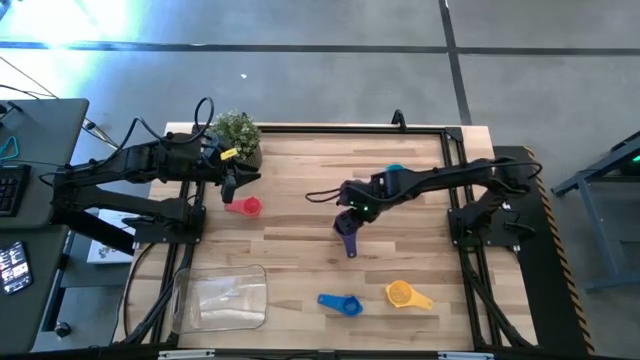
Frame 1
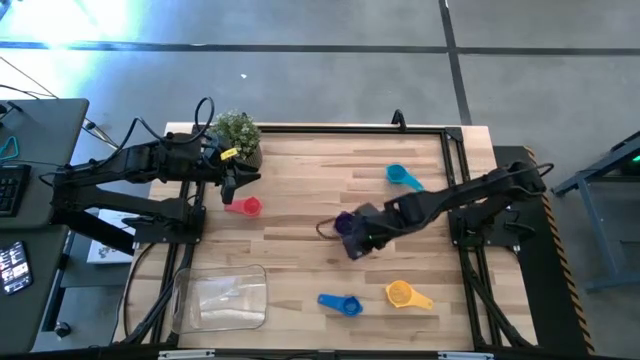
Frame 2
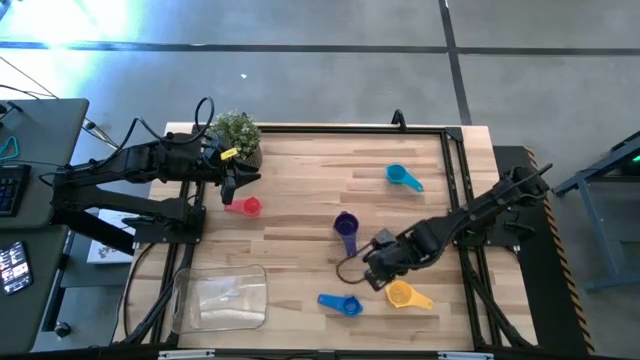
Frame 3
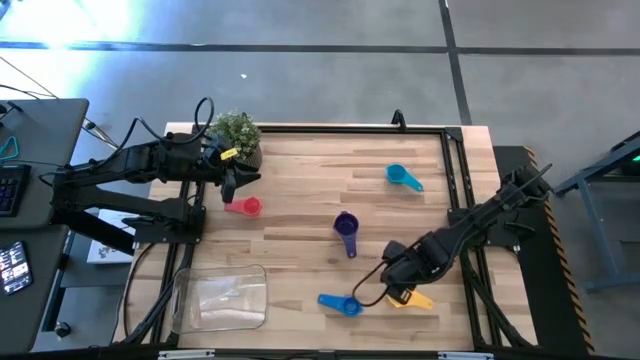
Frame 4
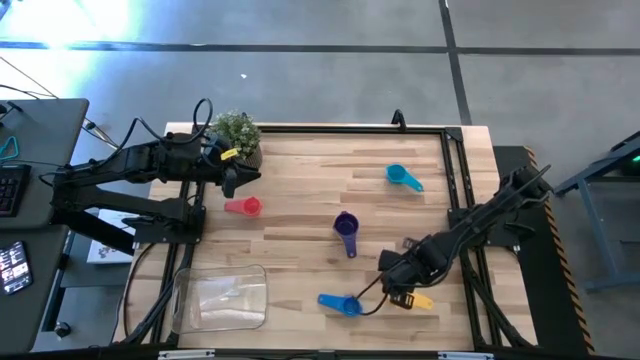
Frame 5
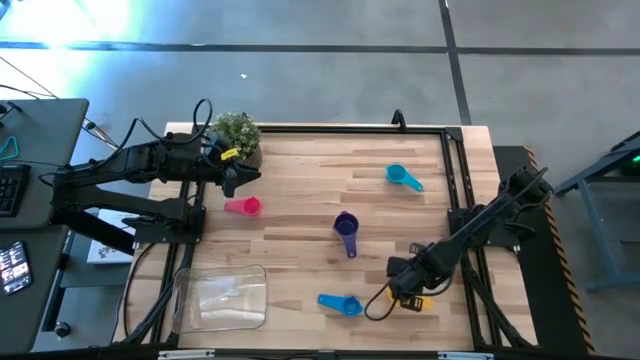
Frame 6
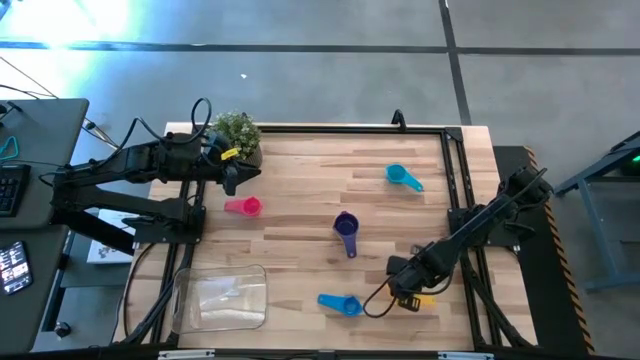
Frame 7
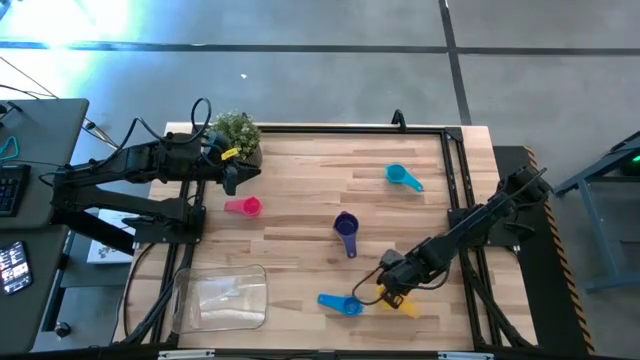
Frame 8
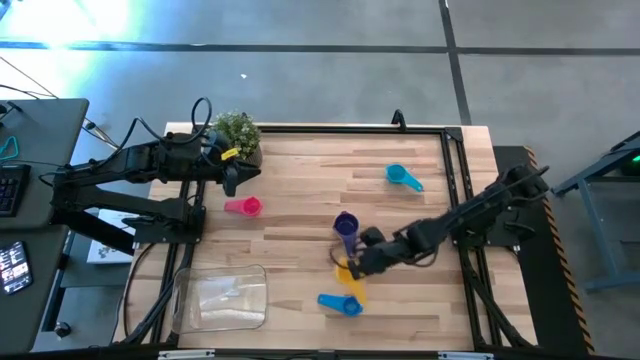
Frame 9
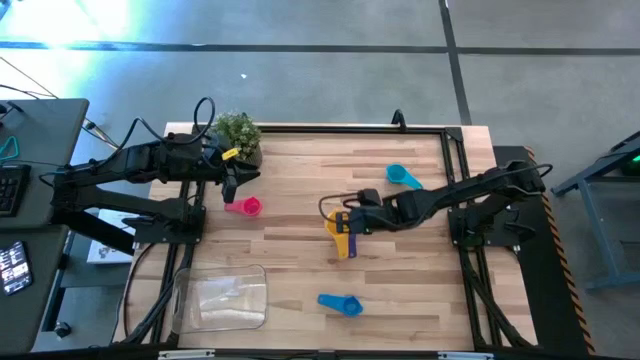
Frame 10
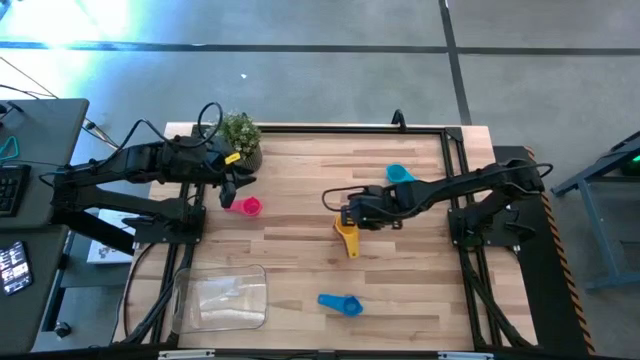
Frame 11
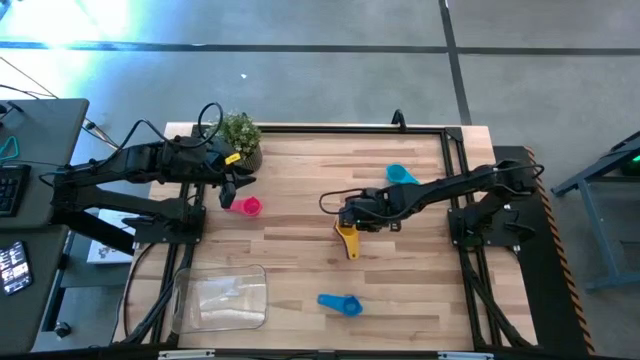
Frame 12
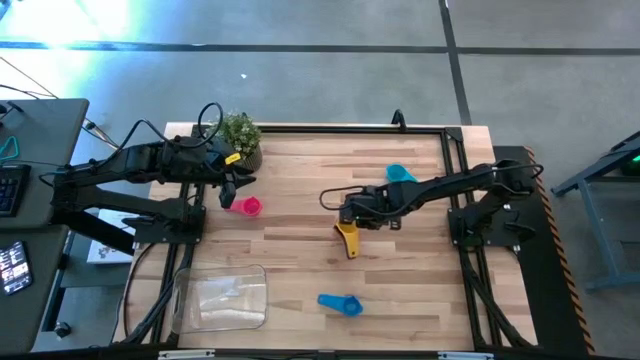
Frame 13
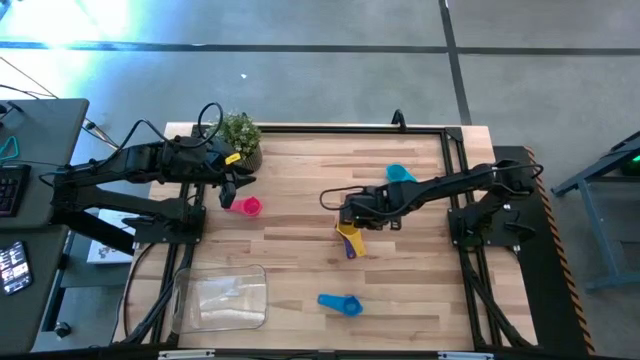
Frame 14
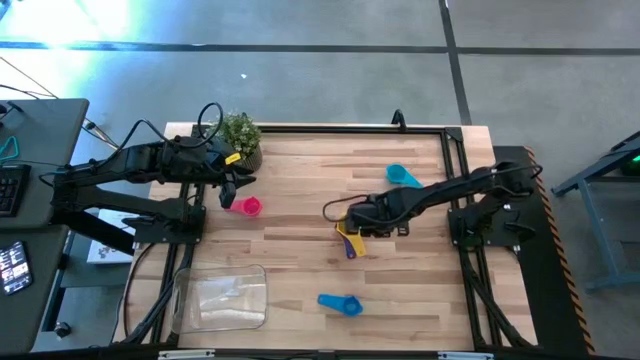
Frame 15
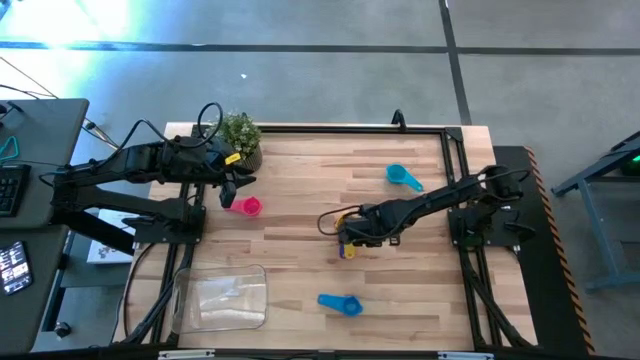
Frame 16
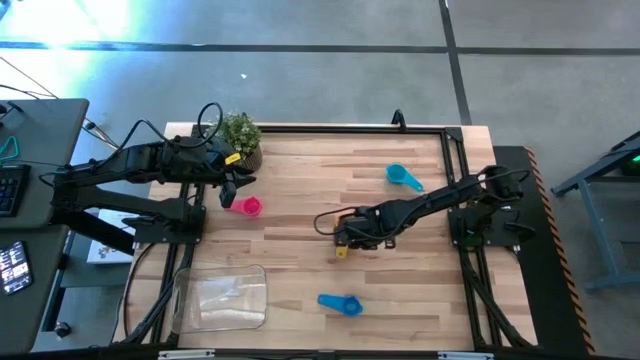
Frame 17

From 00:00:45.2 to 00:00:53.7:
Task: Nest measuring cups in basket
Stack the yellow measuring cup on top of the violet measuring cup

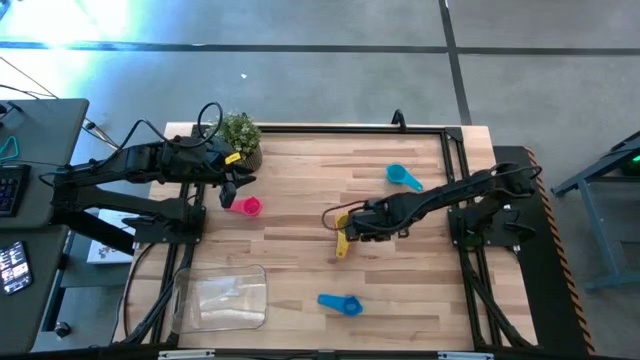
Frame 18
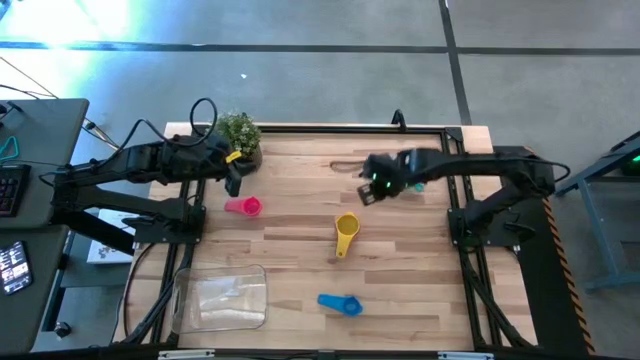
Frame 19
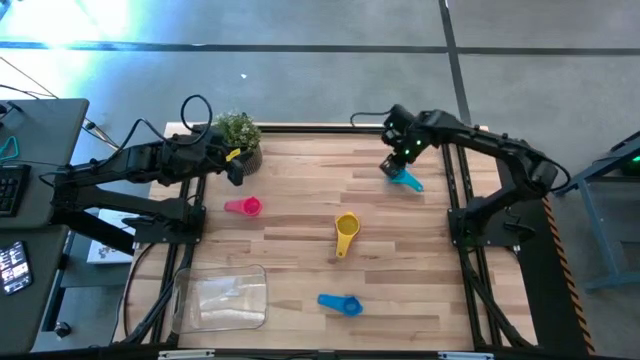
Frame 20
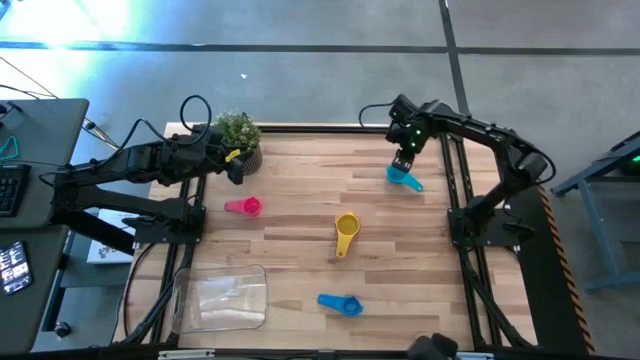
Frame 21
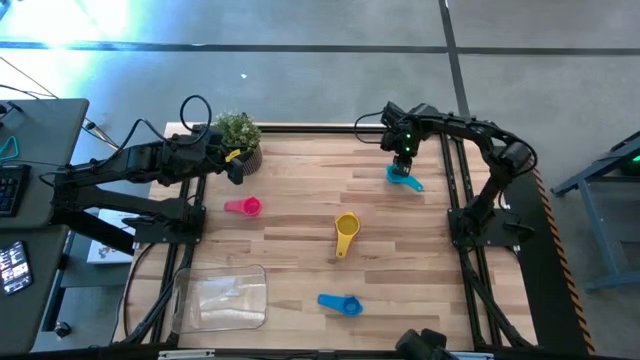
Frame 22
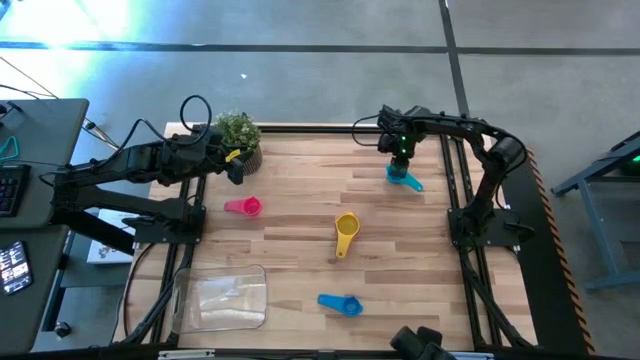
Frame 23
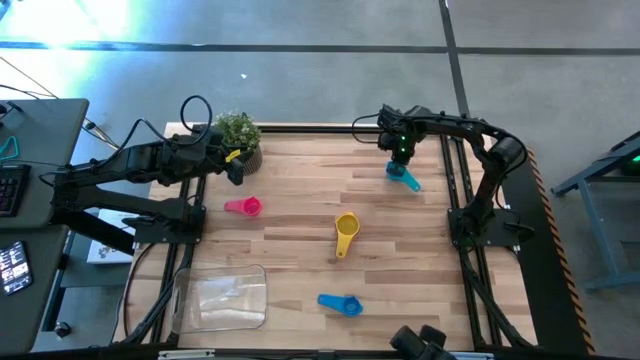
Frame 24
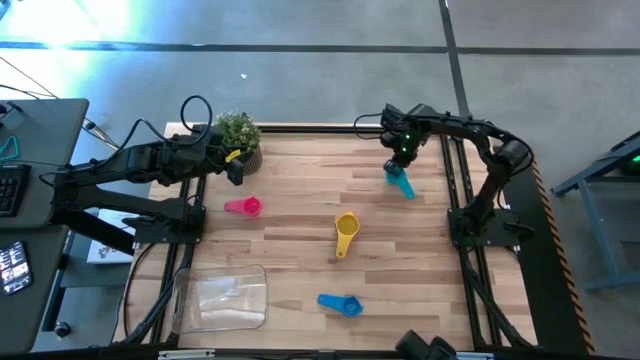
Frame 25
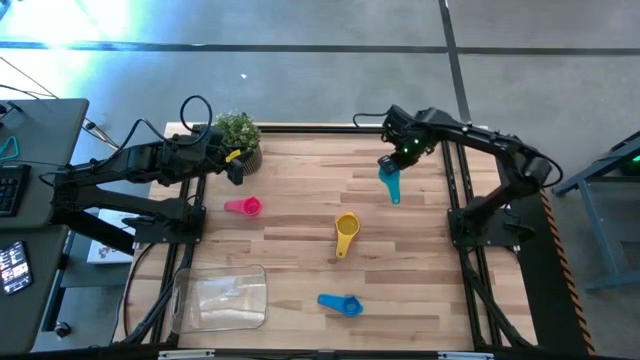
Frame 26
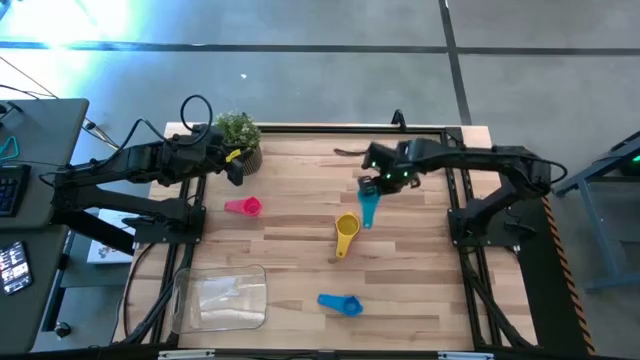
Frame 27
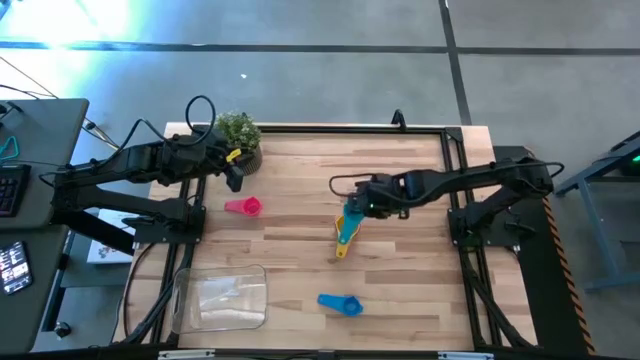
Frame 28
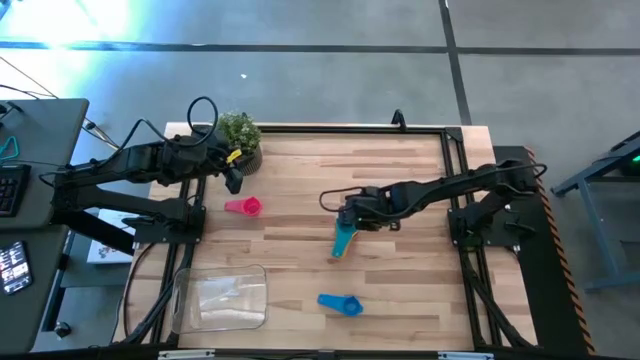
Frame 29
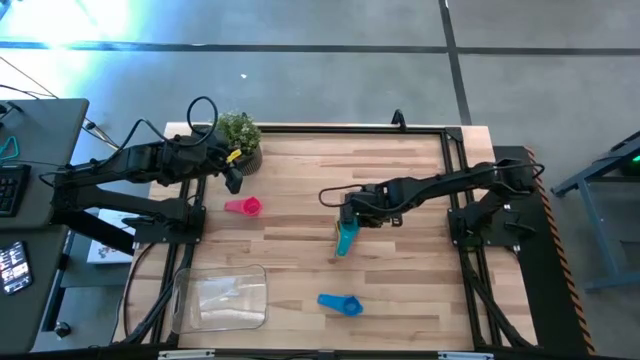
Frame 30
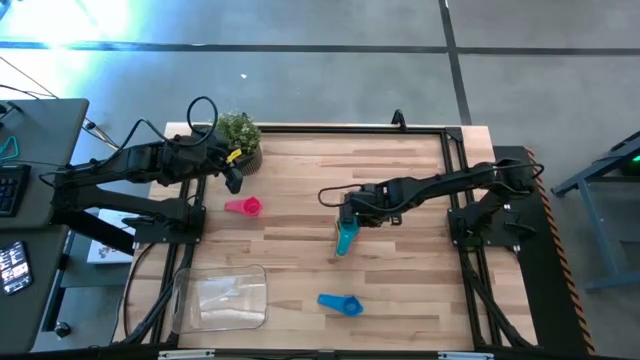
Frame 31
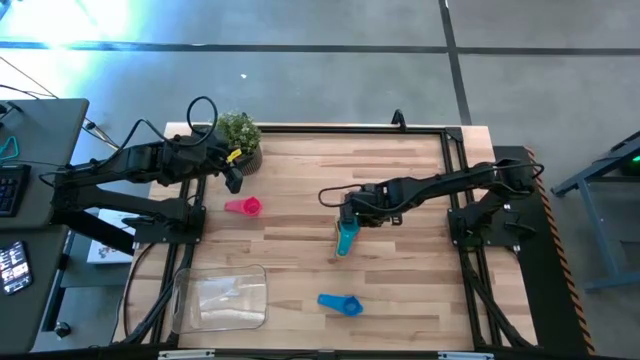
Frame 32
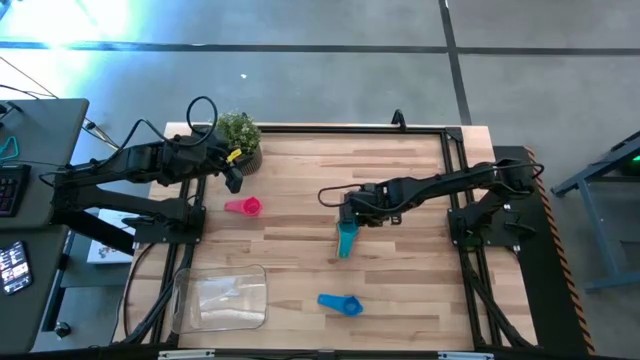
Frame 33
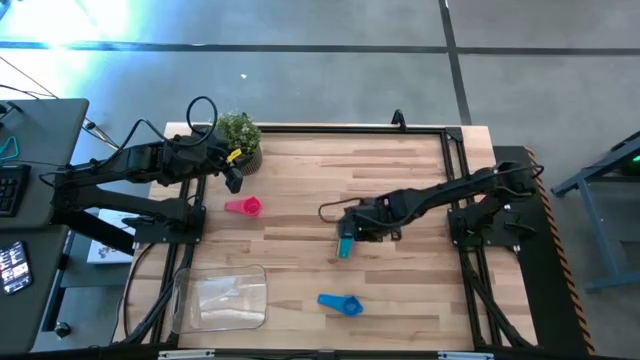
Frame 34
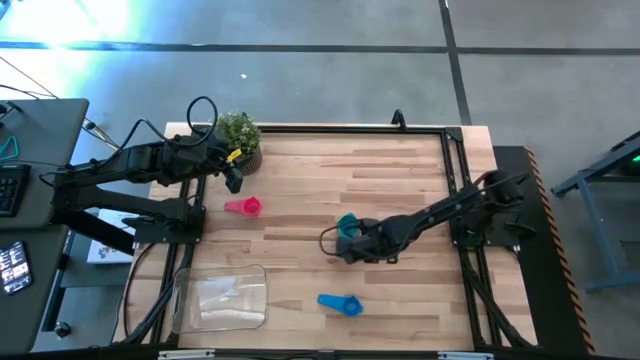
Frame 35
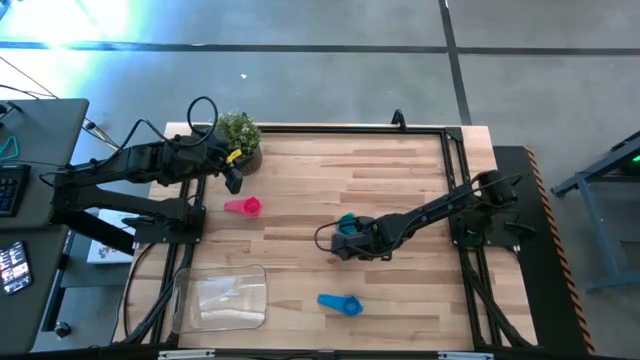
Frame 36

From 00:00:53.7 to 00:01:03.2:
Stack the light blue measuring cup on top of the yellow measuring cup

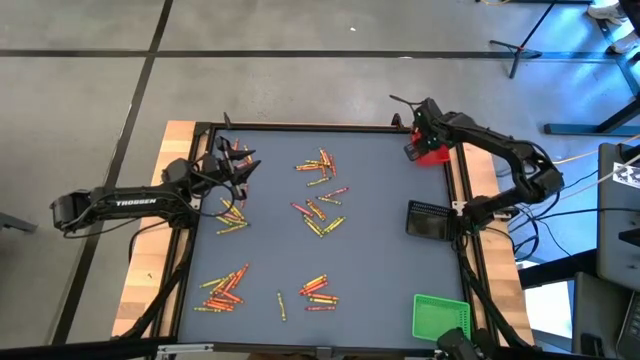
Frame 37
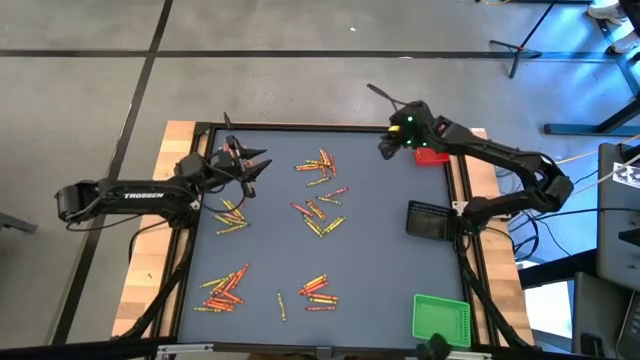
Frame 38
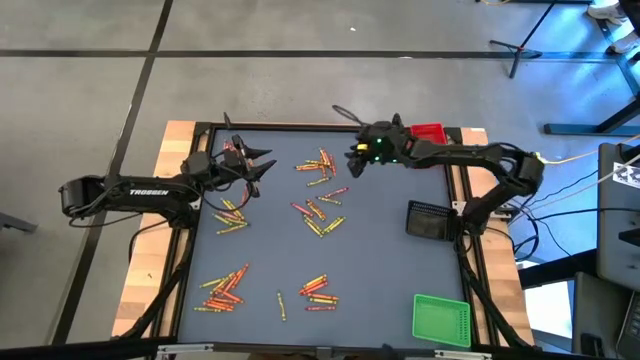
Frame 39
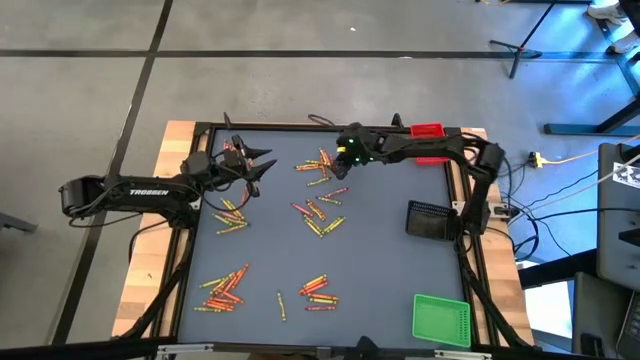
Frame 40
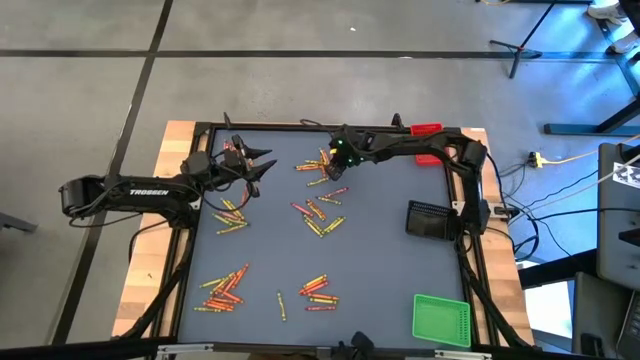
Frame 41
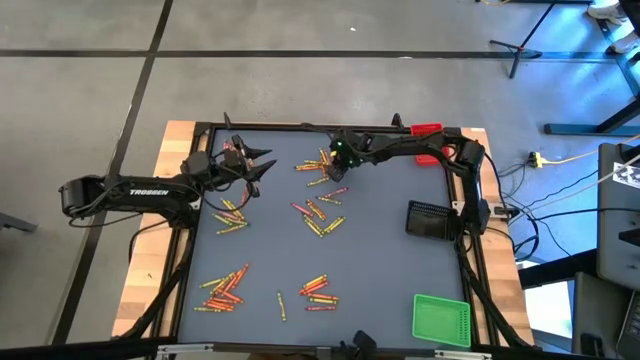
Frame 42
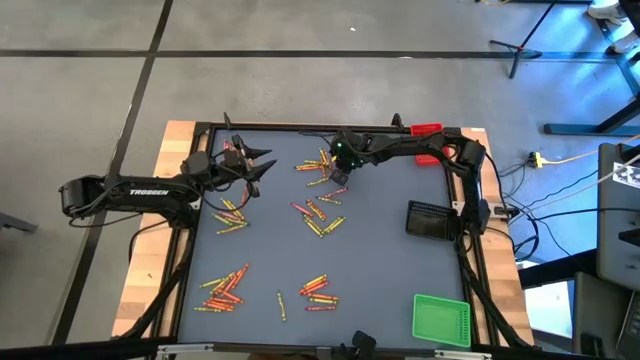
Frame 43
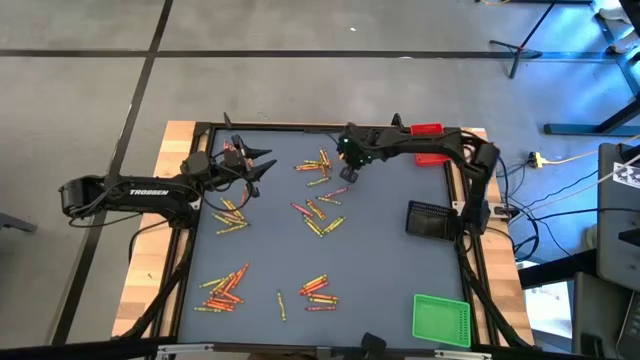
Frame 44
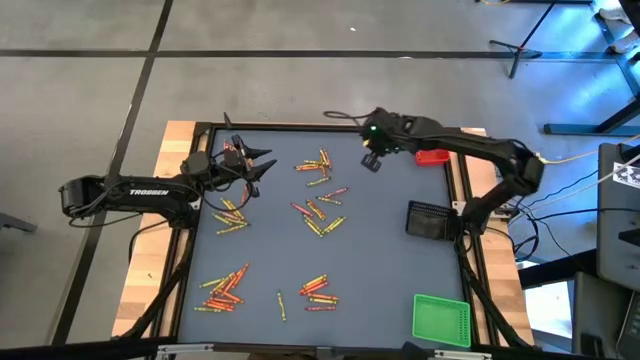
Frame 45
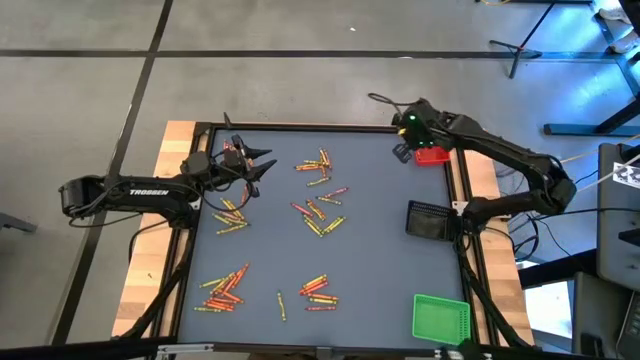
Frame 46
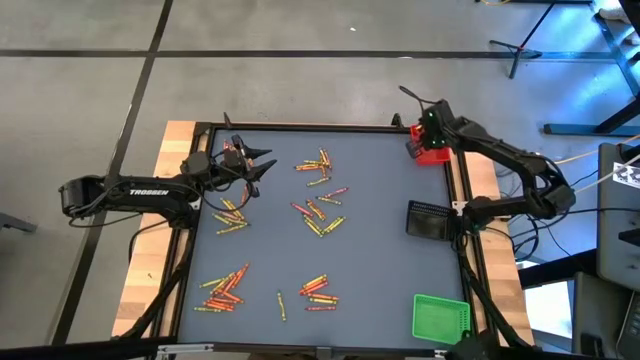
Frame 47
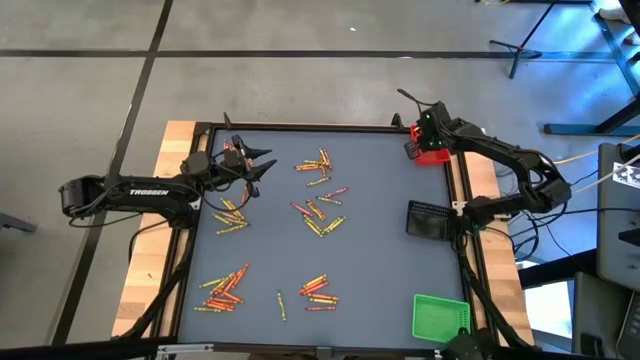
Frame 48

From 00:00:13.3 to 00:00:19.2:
Task: Sort crayons
Put the orange crayon into the red basket
